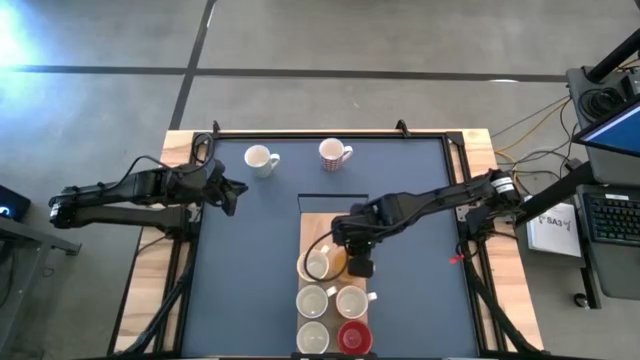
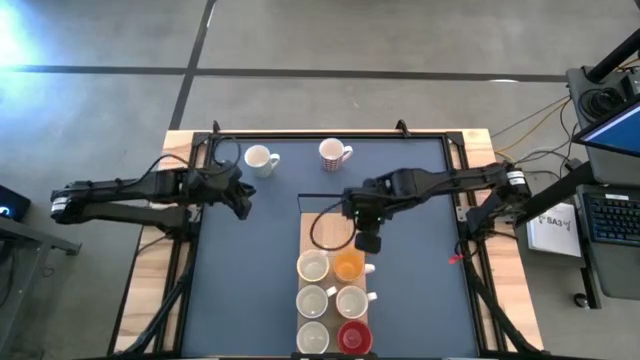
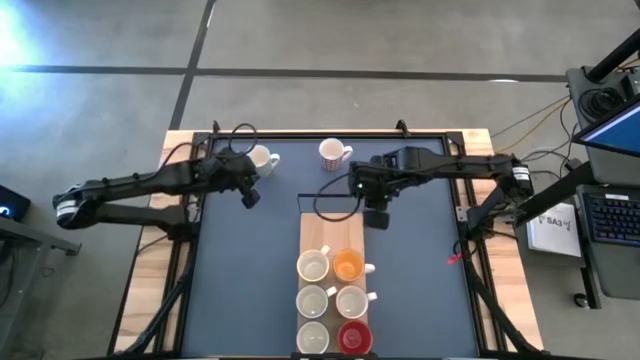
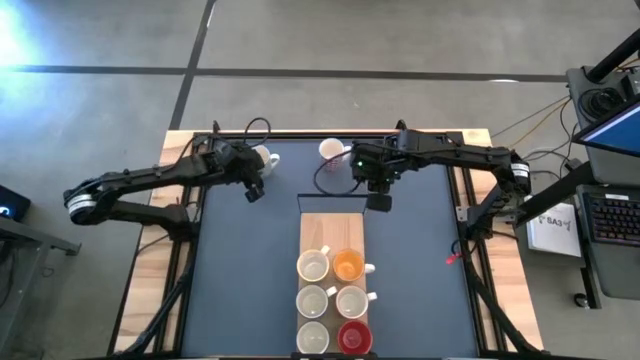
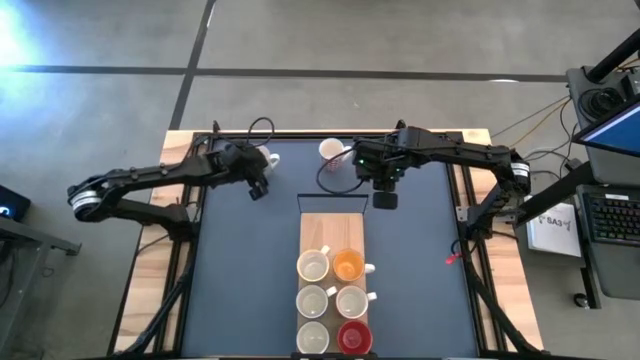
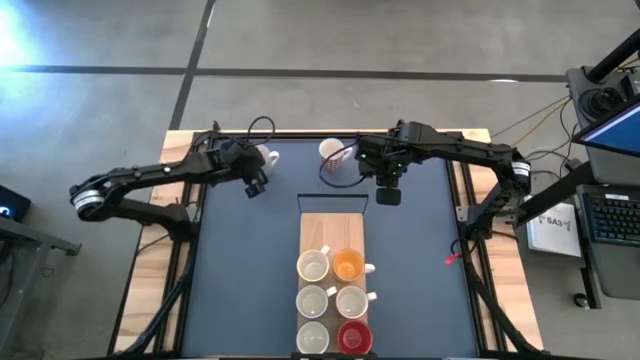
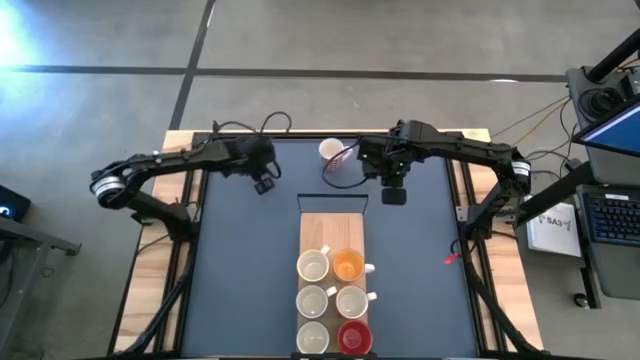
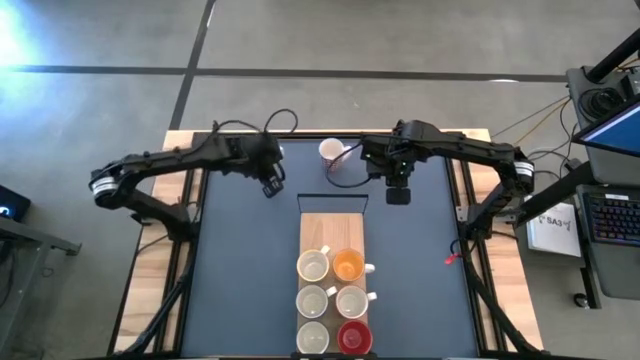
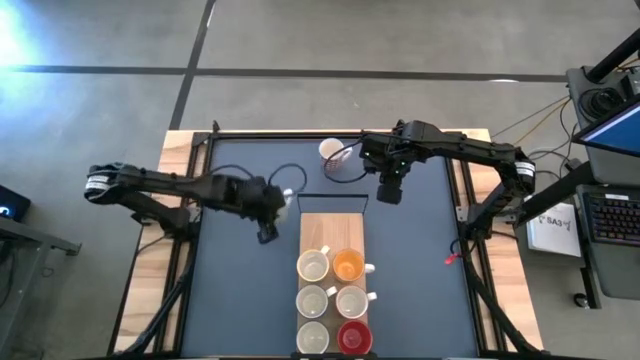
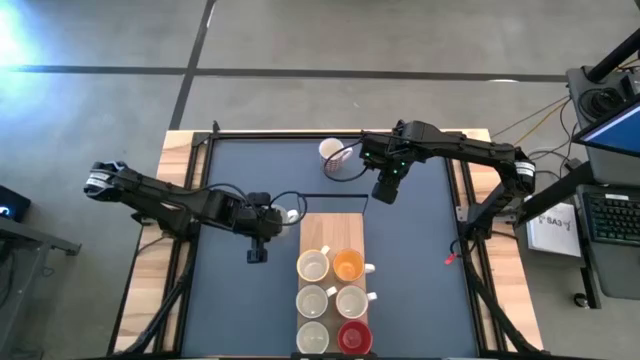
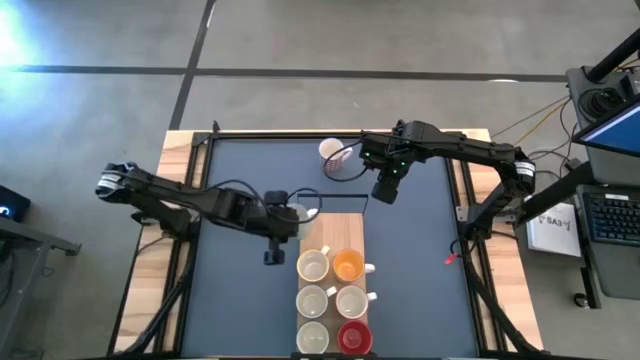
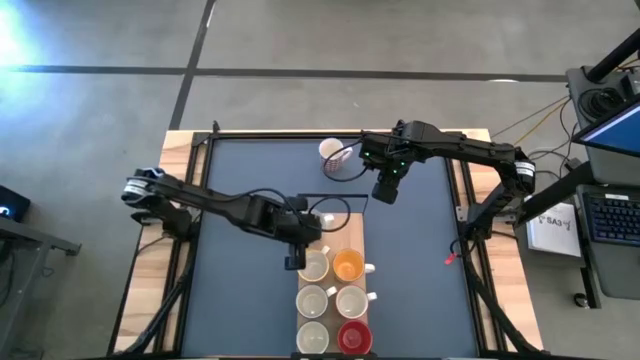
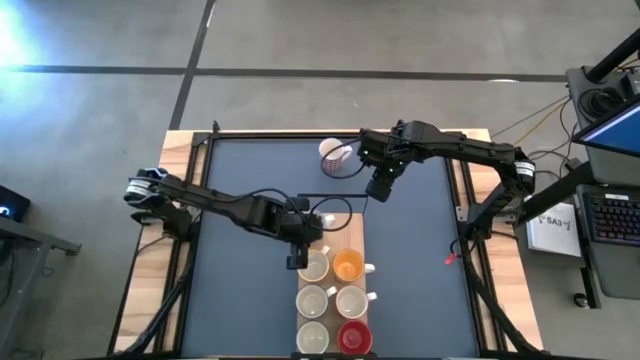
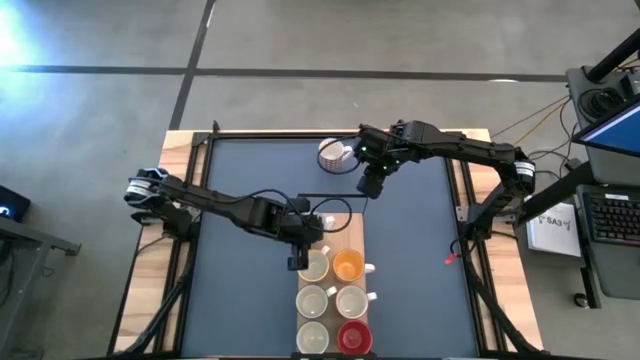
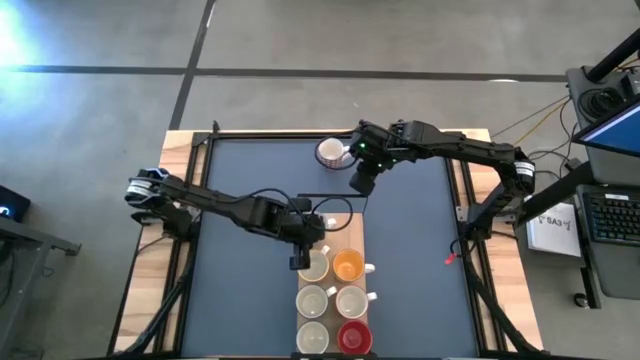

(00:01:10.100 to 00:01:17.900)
Task: Place coffee mugs
Put the blue and gray mug on the shelf

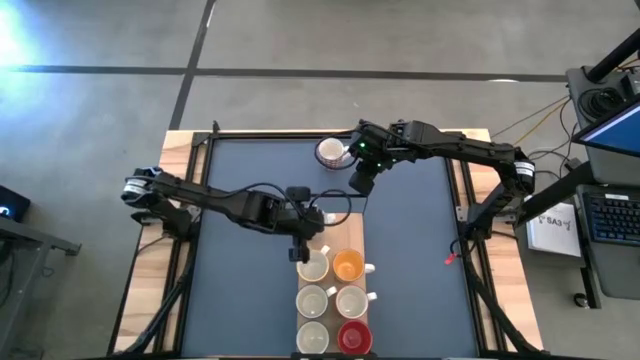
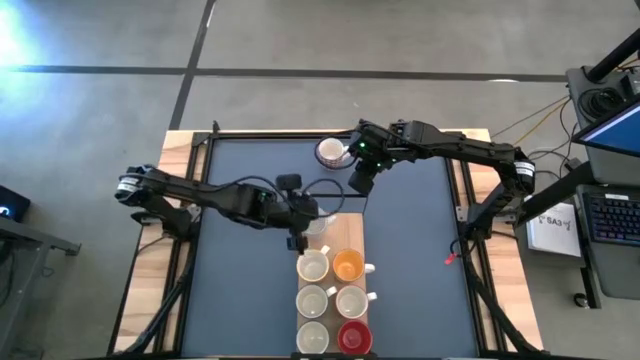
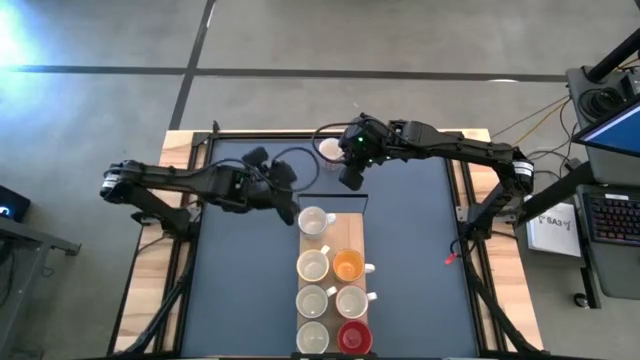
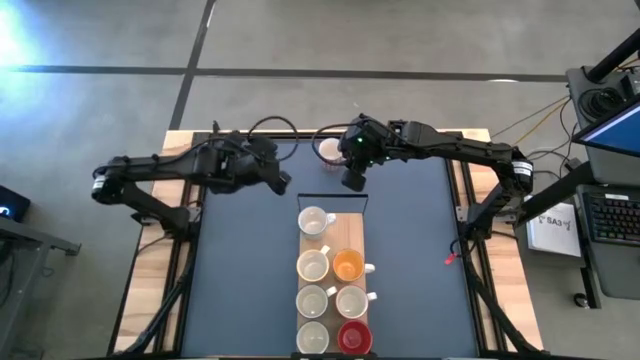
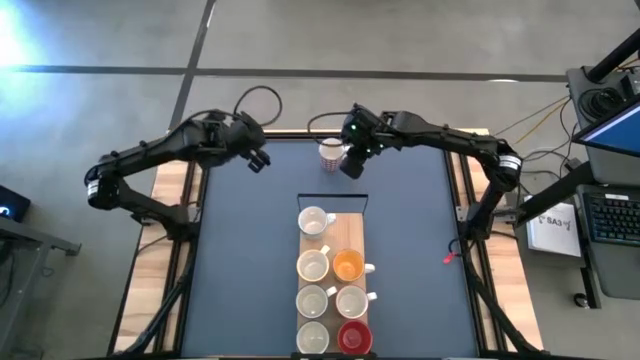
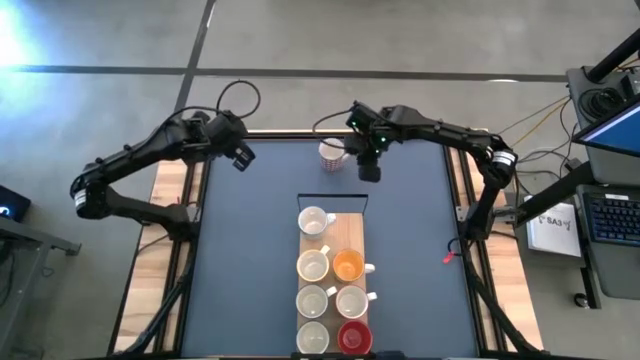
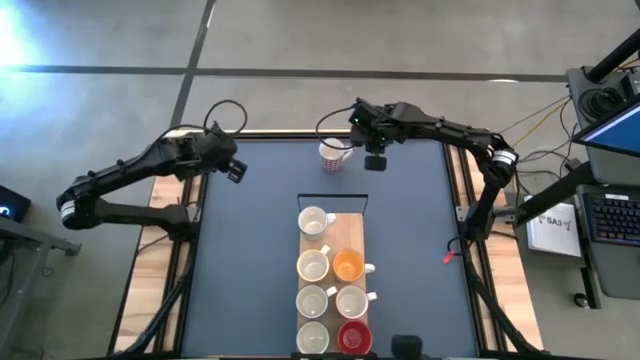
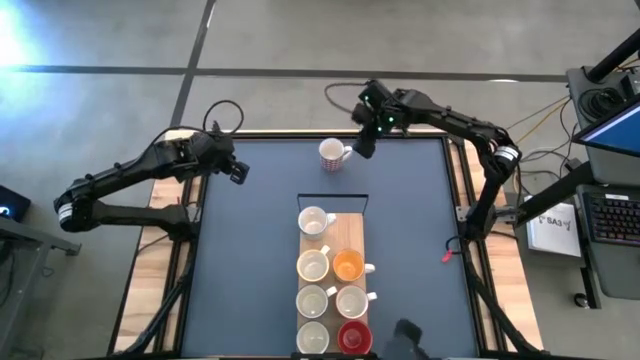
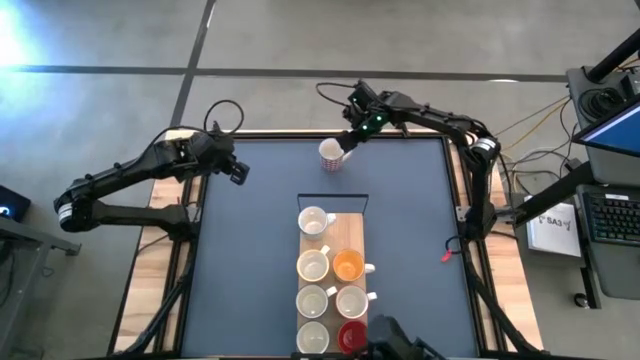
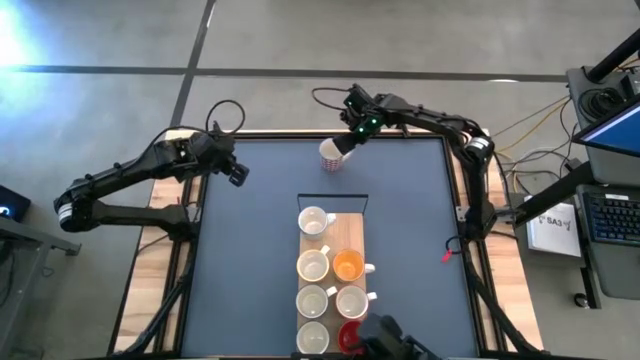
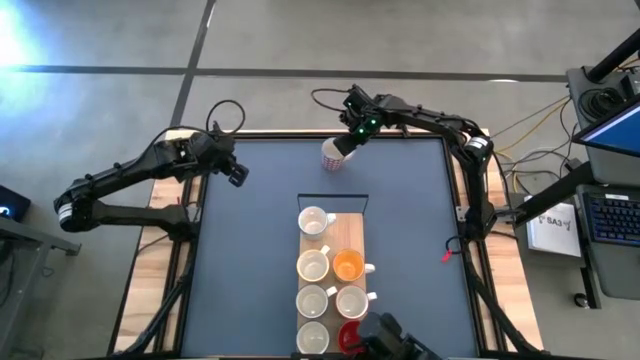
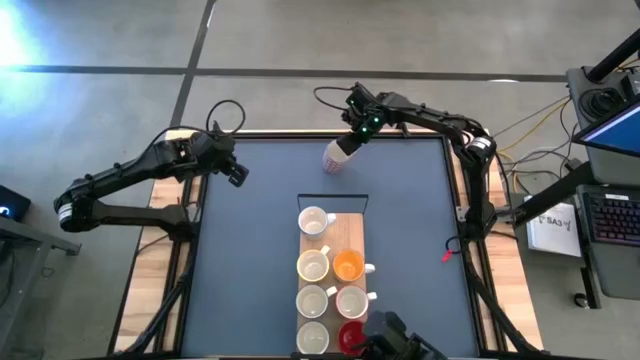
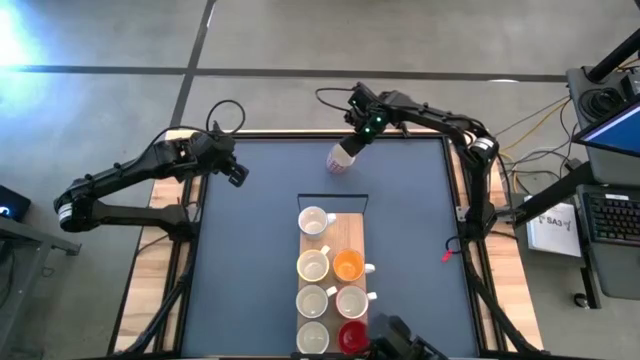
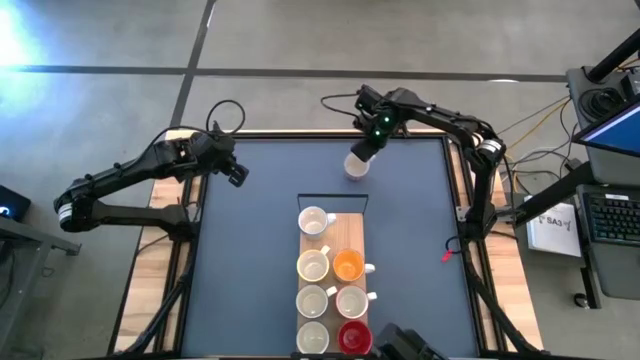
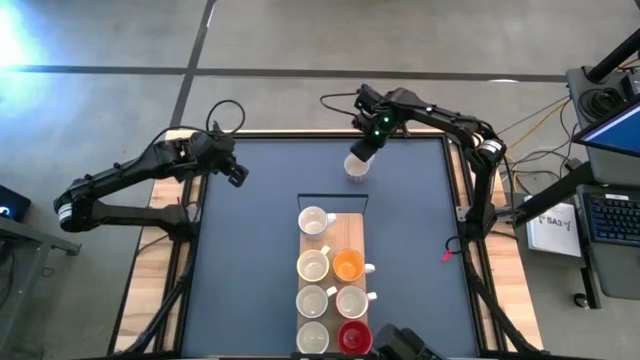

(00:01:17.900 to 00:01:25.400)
Put the blue and red mug on the shelf

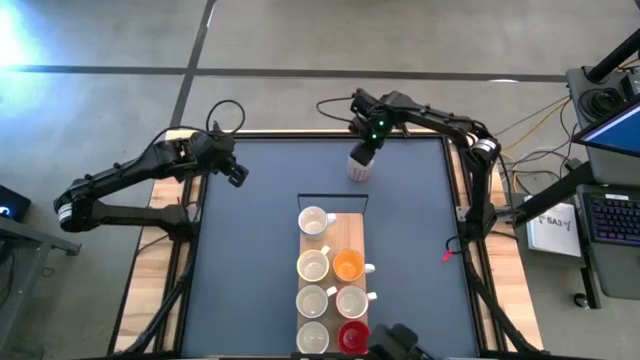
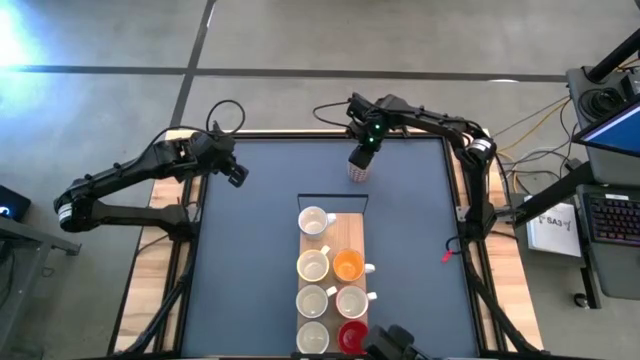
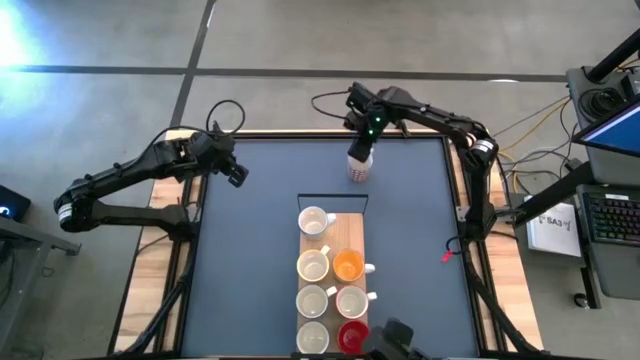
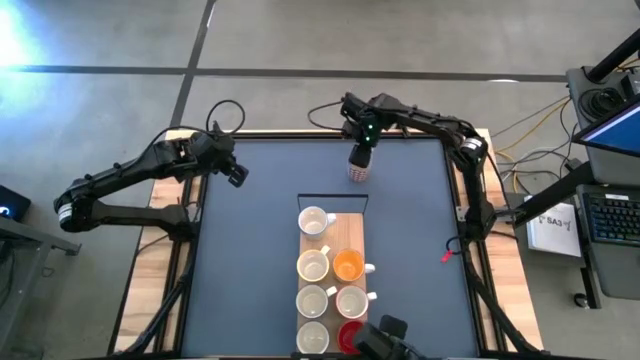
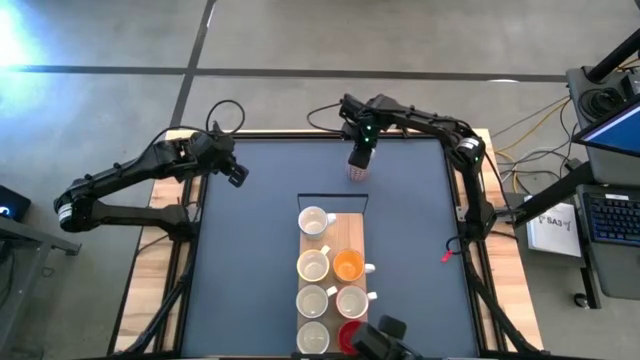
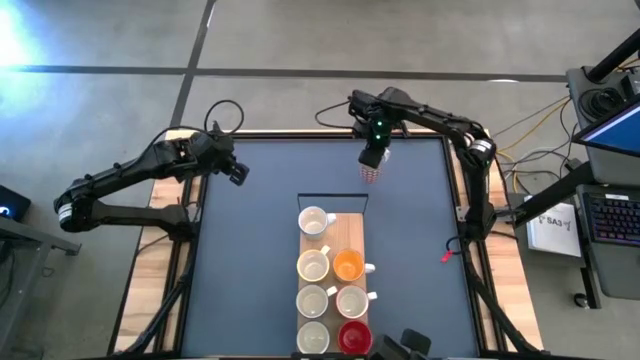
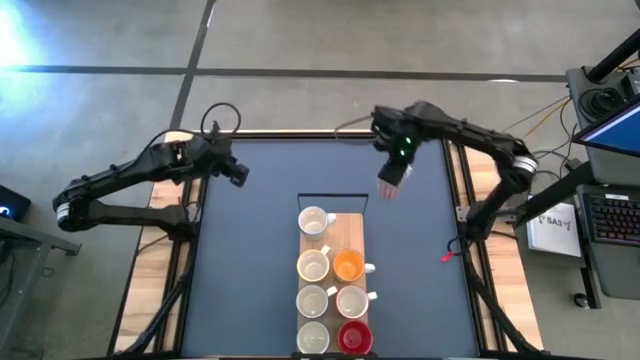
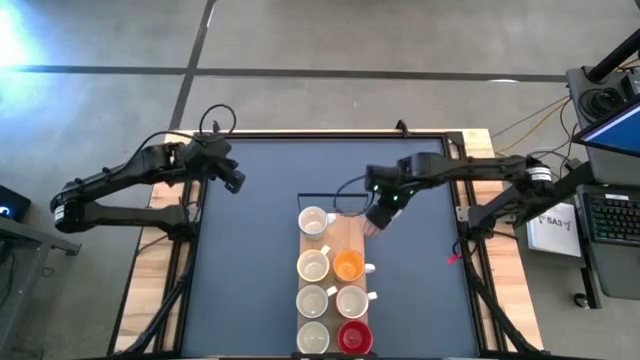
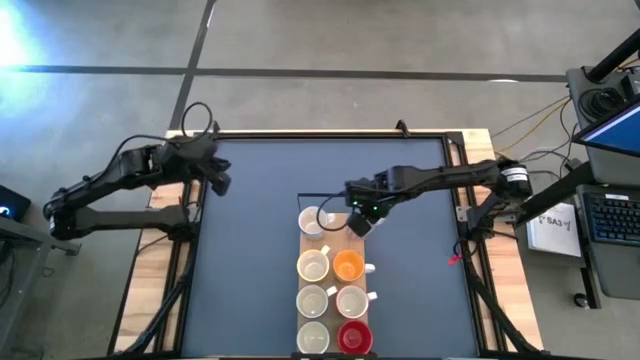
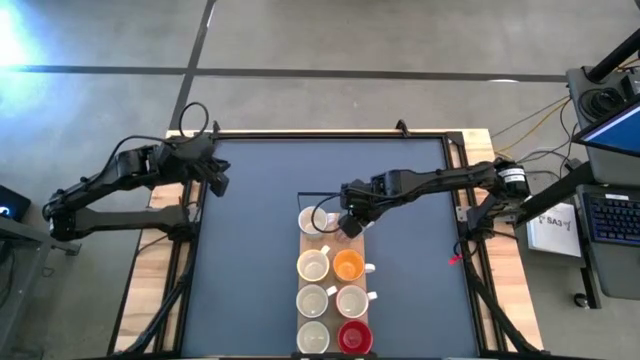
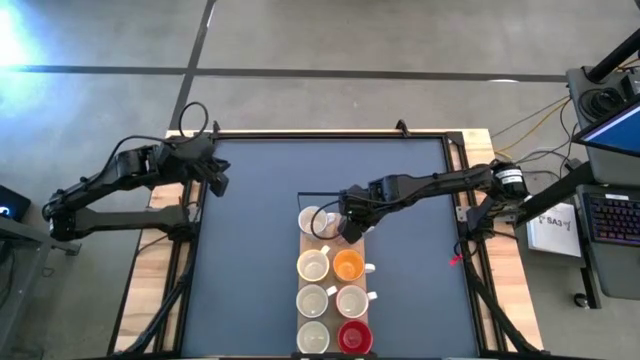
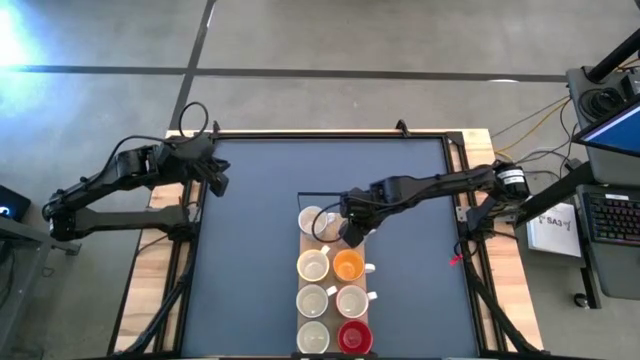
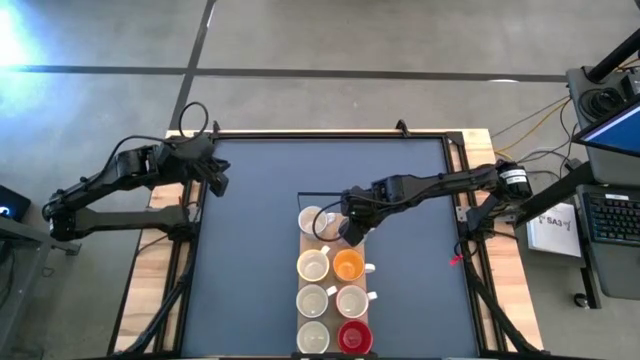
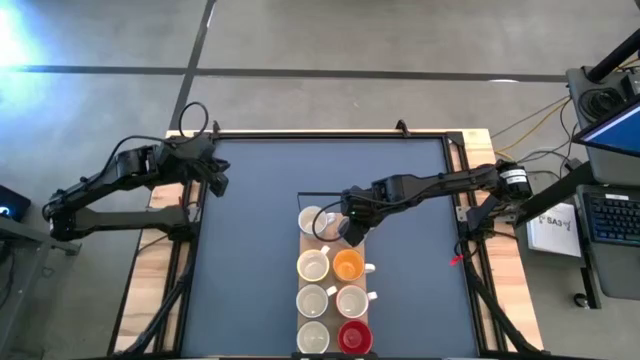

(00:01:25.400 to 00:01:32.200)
Put the blue and red mug on the shelf
